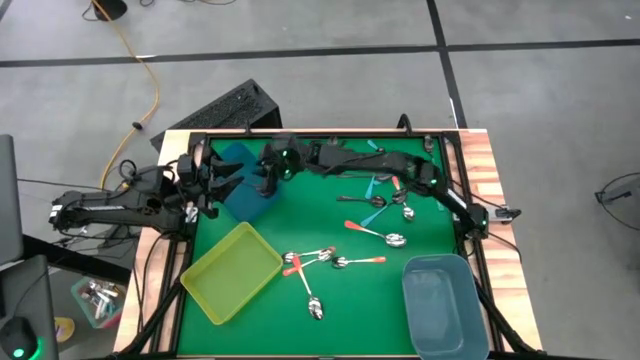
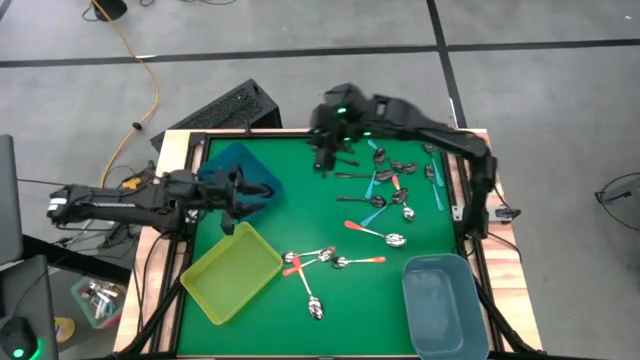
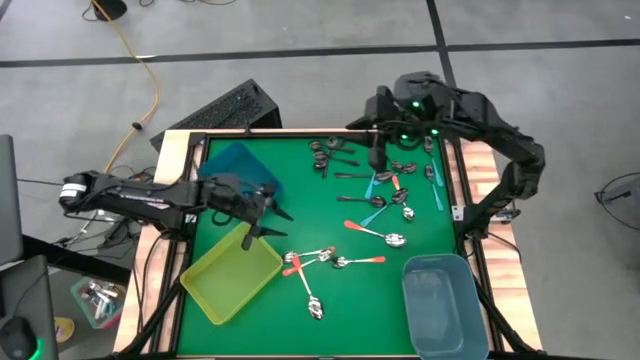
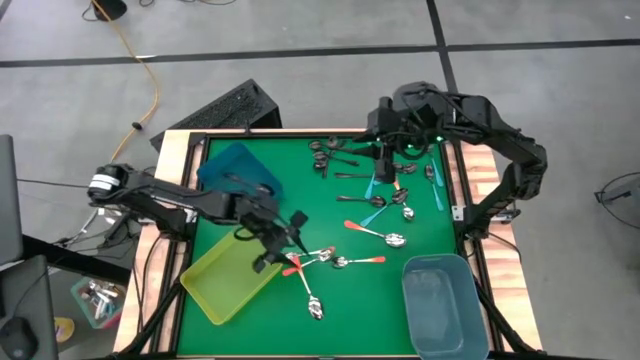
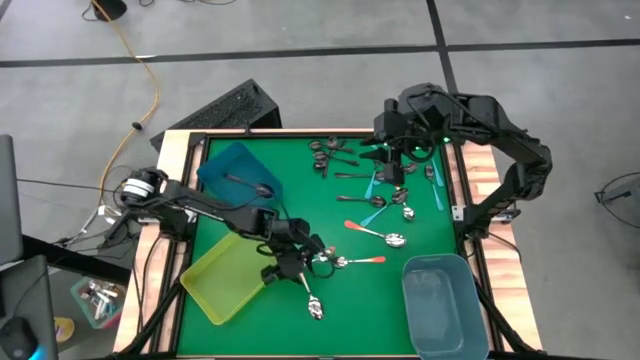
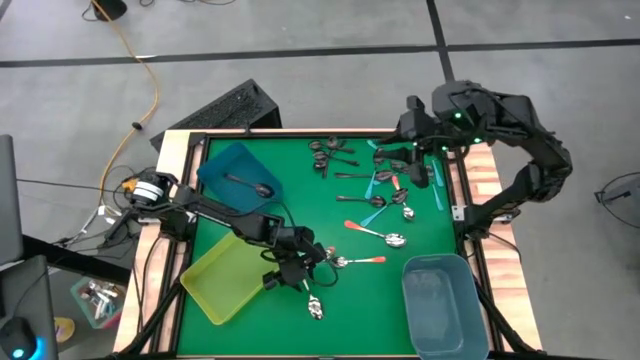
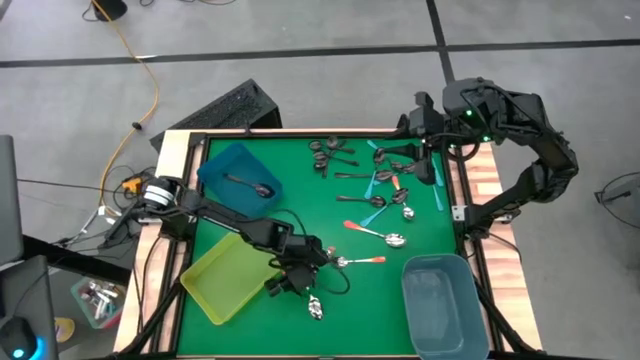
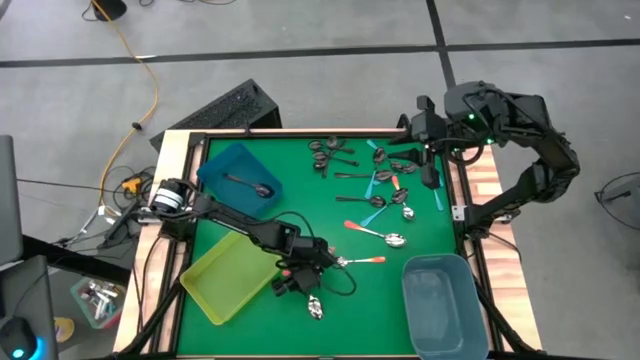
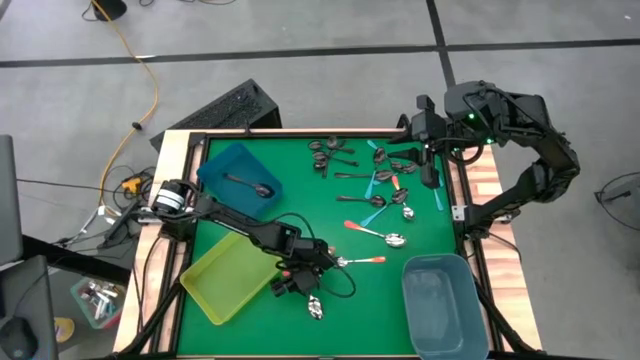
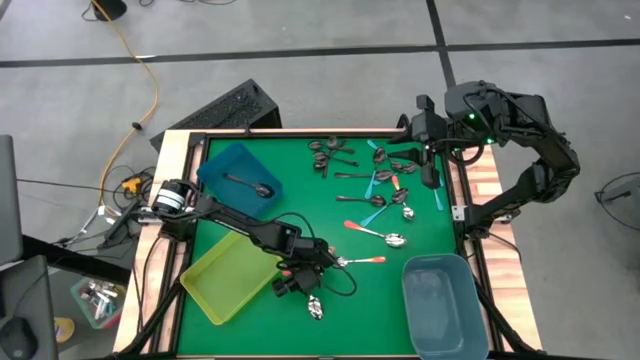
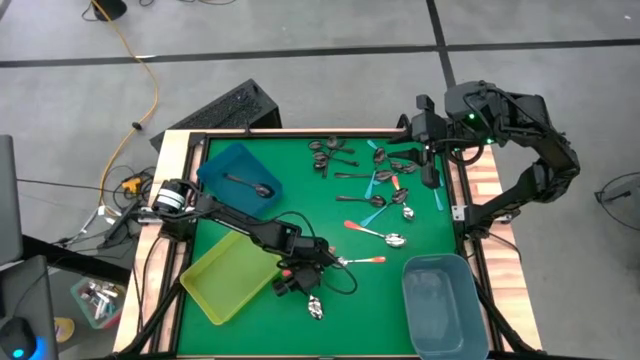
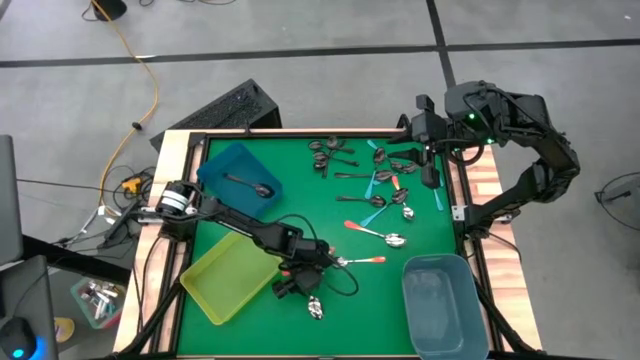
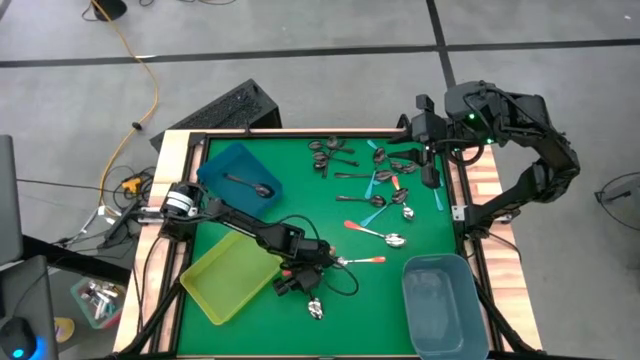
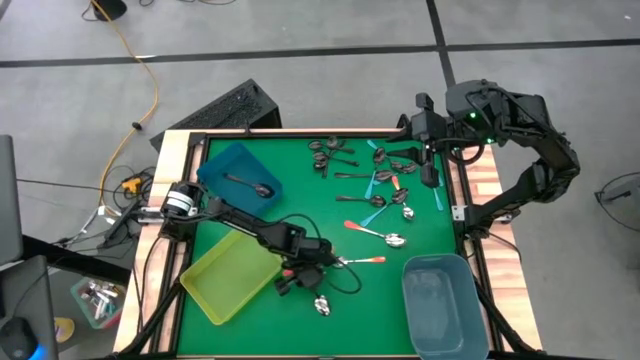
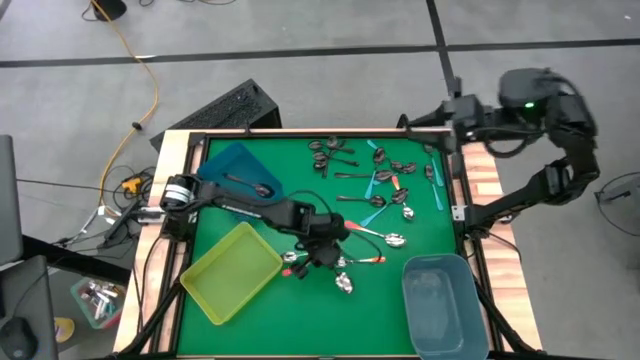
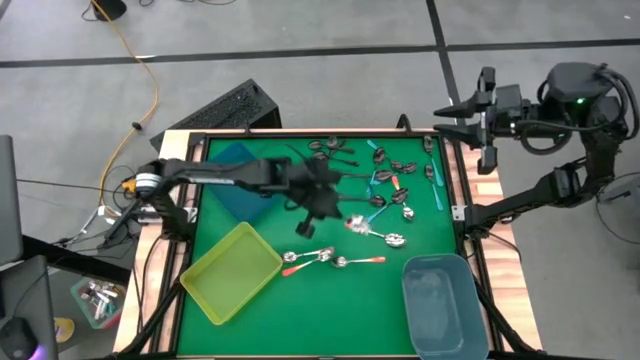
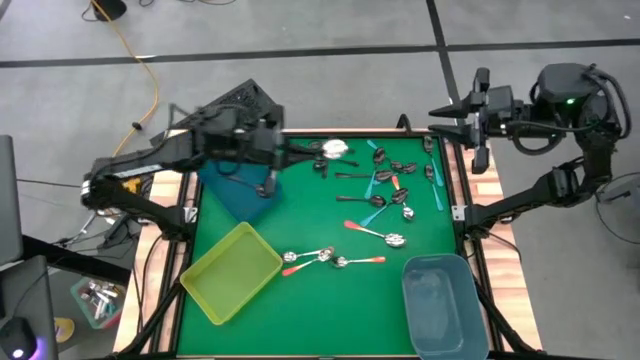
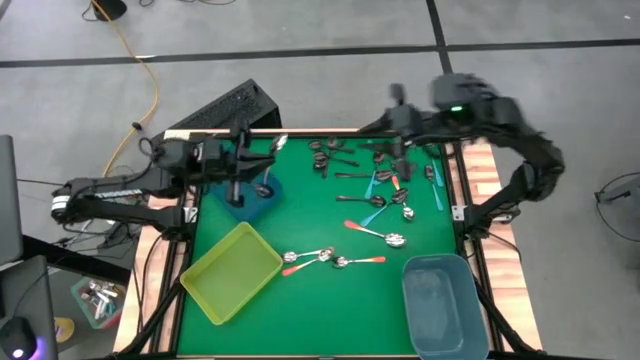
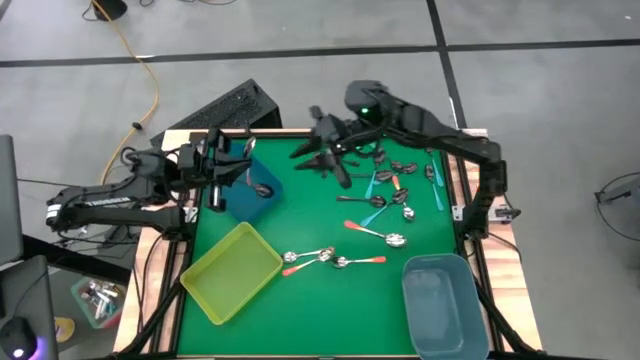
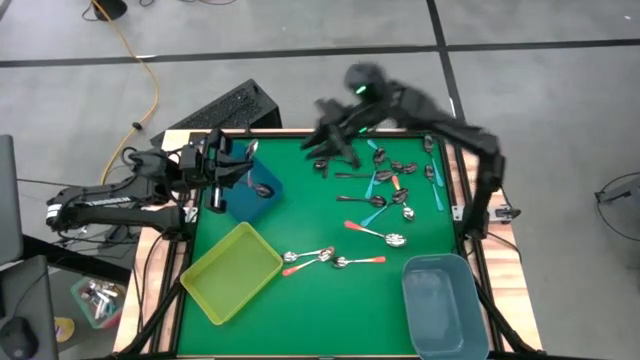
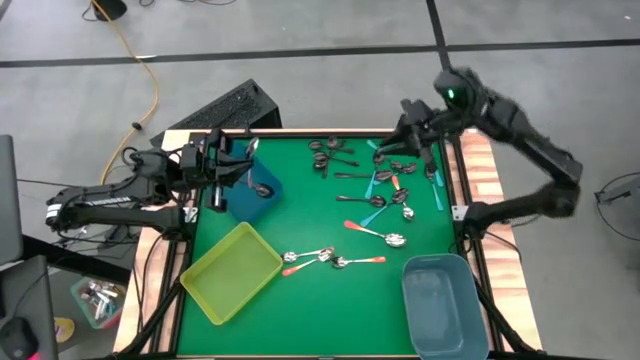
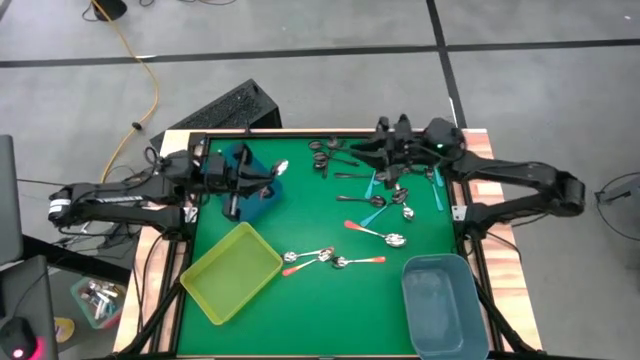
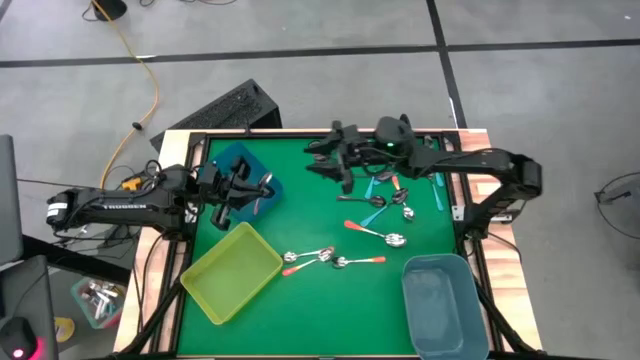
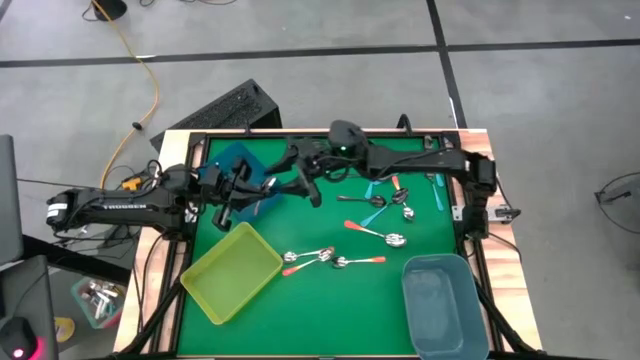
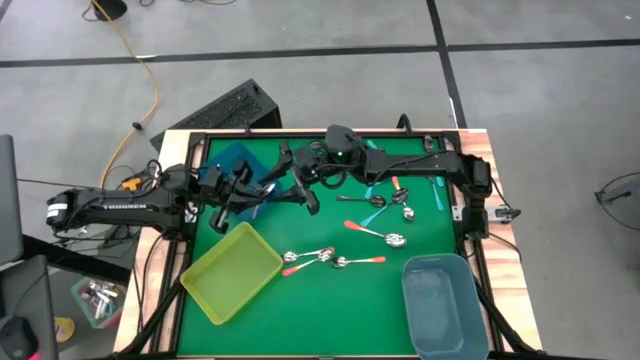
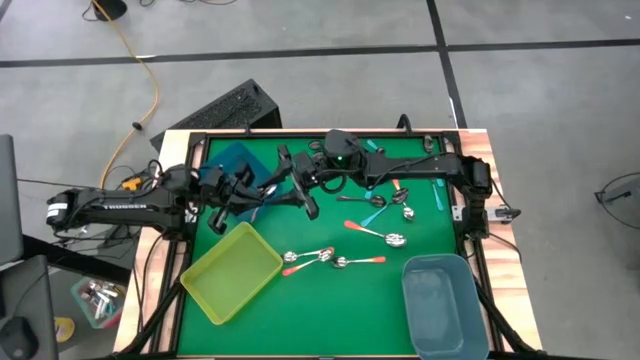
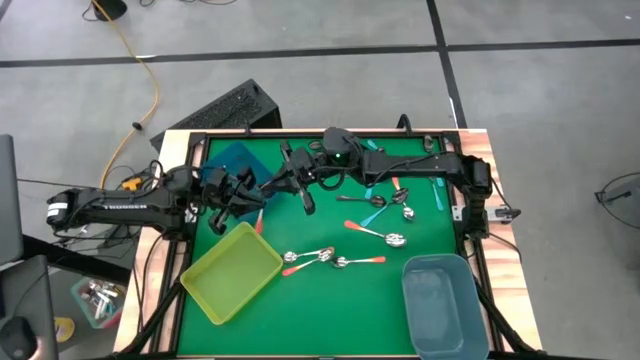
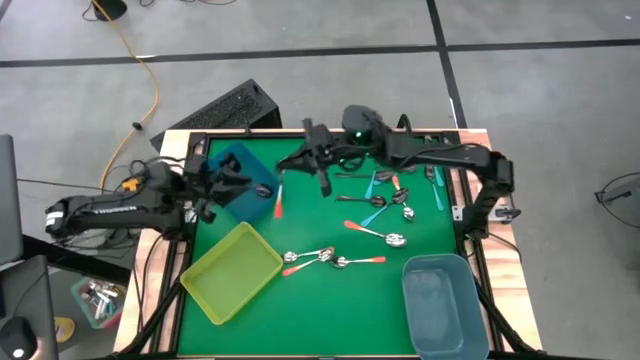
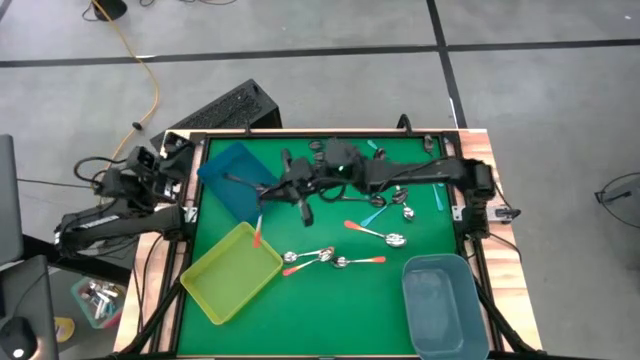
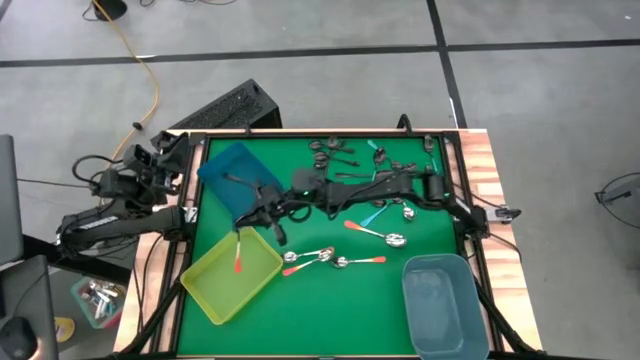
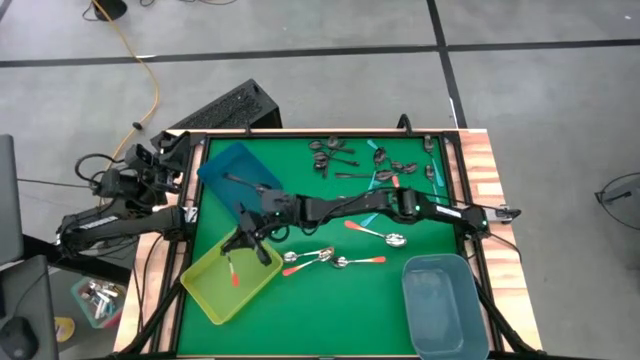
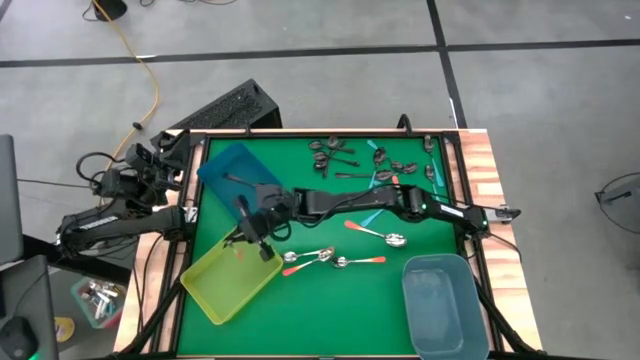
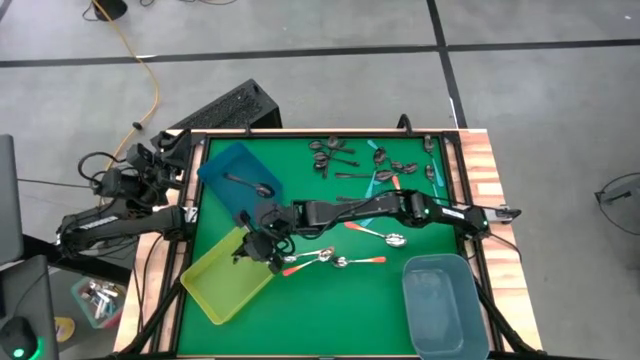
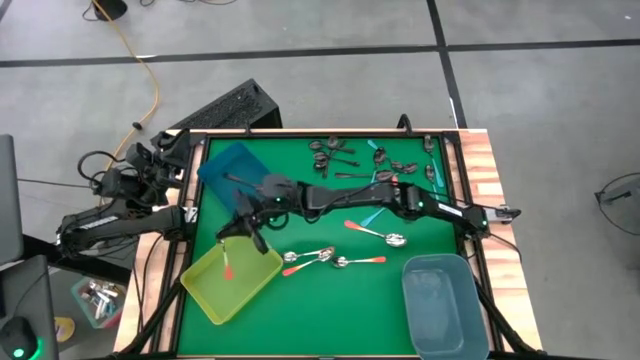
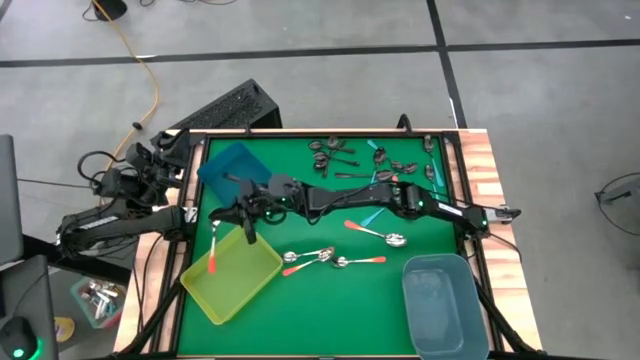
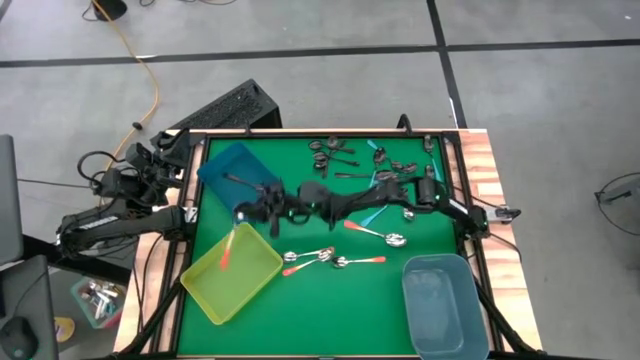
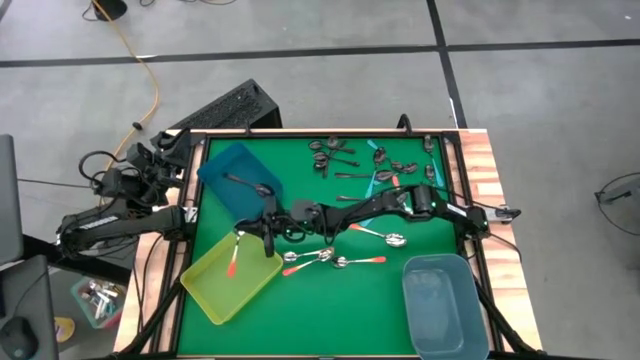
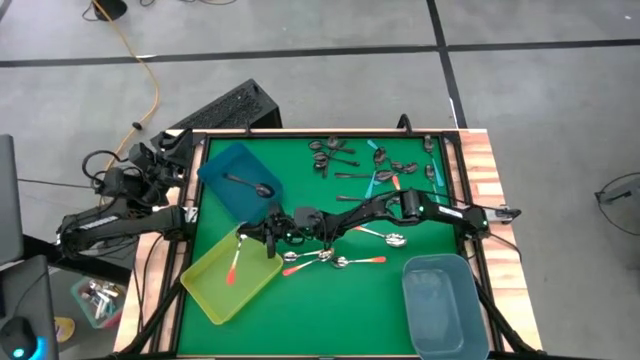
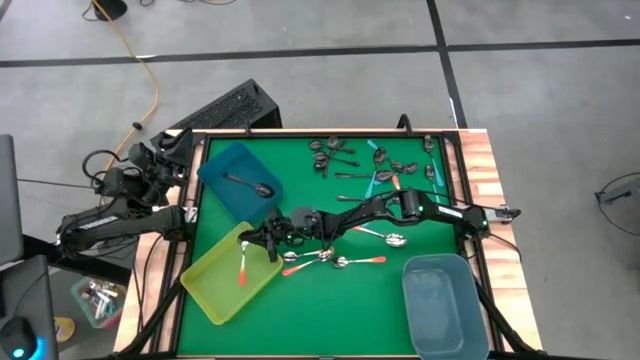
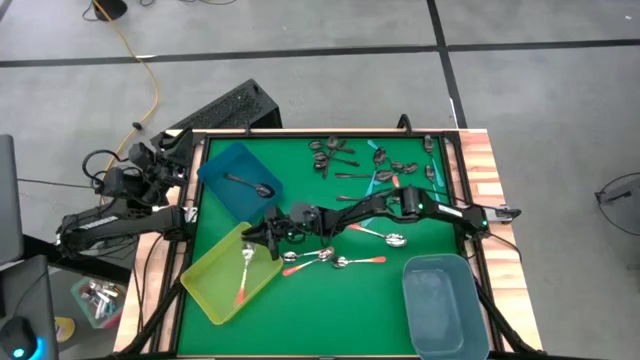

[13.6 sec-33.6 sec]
Task: Sort silverware by color (type)
Put the orange spoon into the green bin
